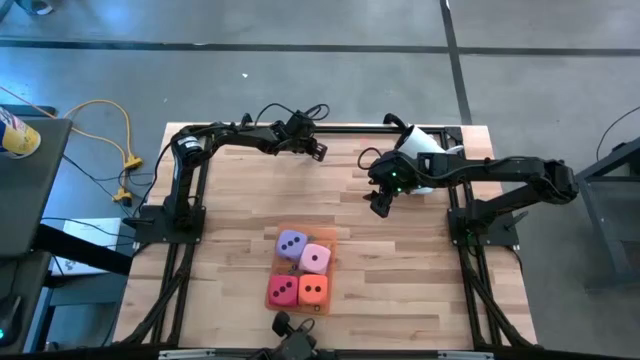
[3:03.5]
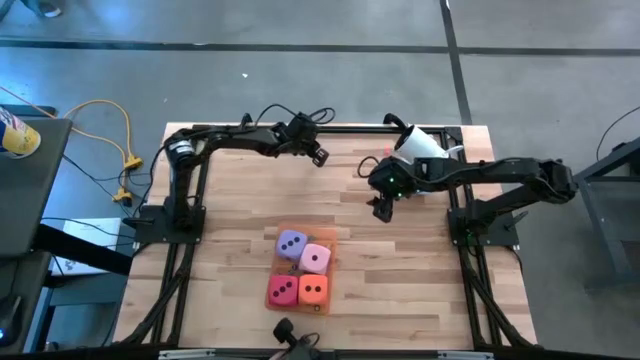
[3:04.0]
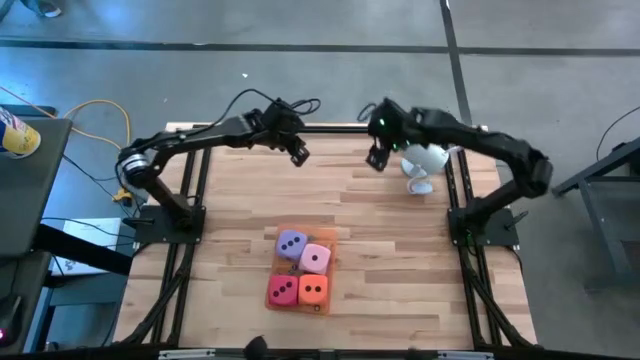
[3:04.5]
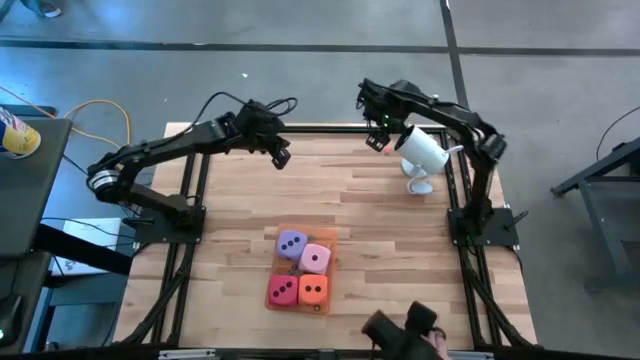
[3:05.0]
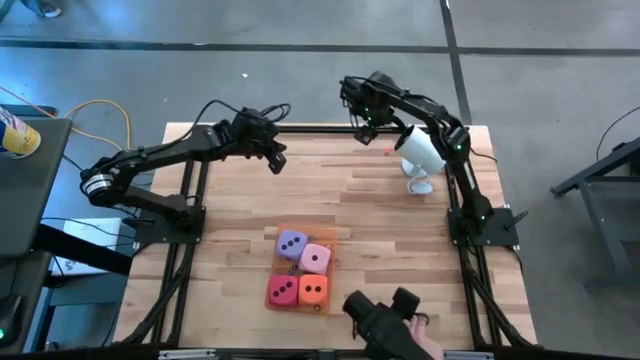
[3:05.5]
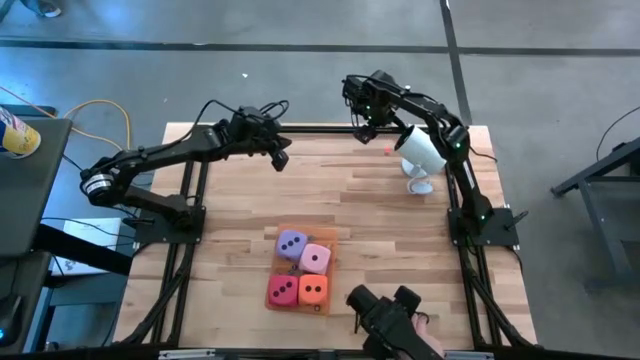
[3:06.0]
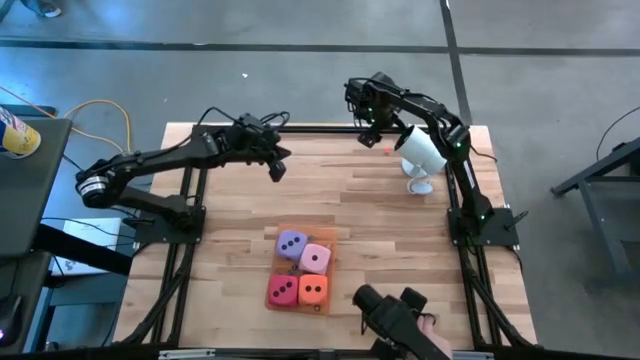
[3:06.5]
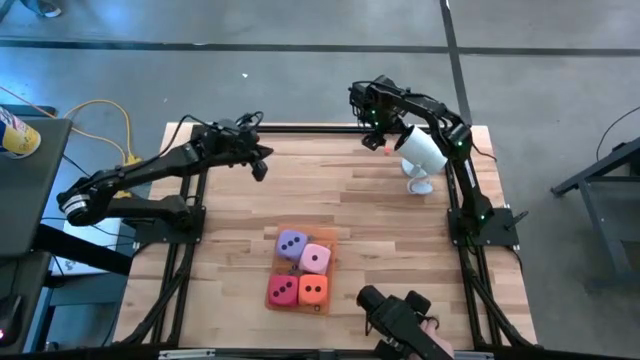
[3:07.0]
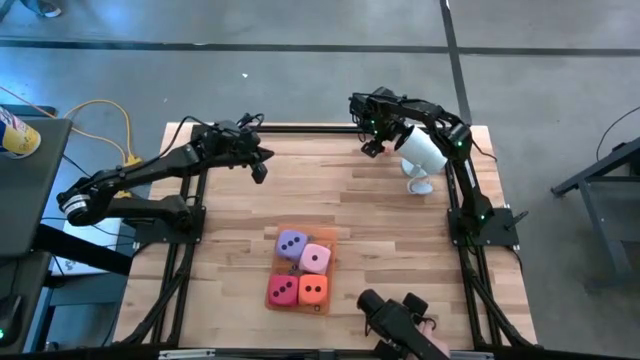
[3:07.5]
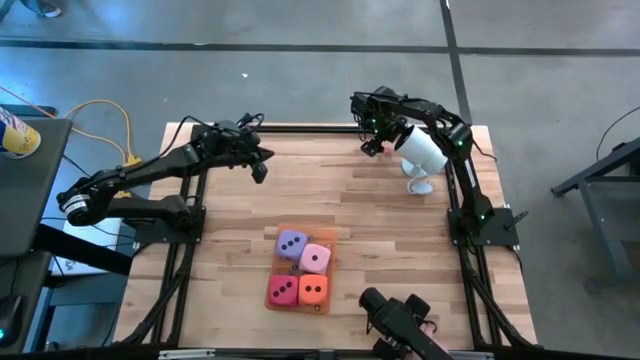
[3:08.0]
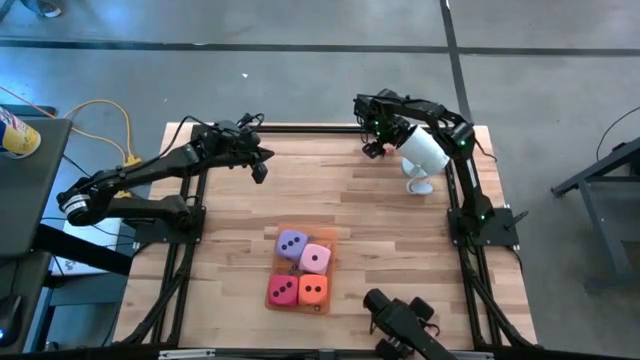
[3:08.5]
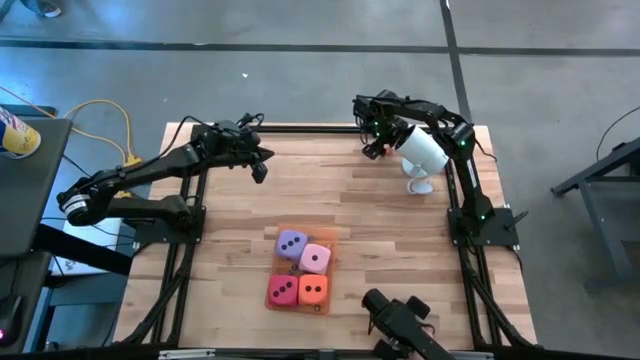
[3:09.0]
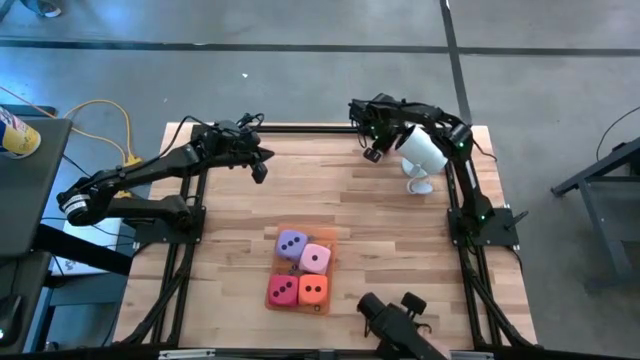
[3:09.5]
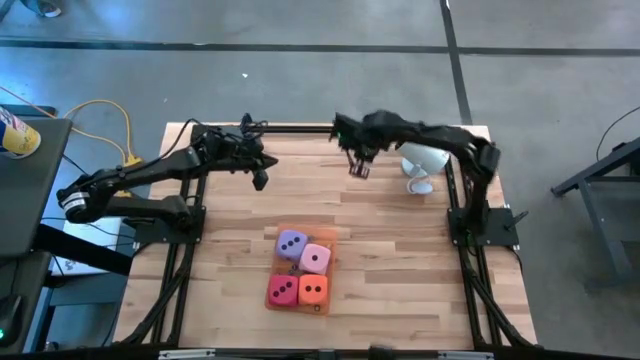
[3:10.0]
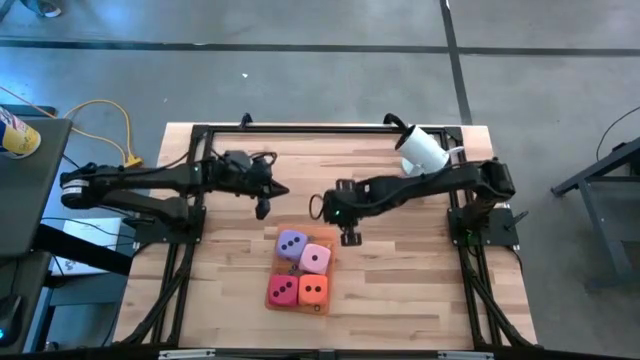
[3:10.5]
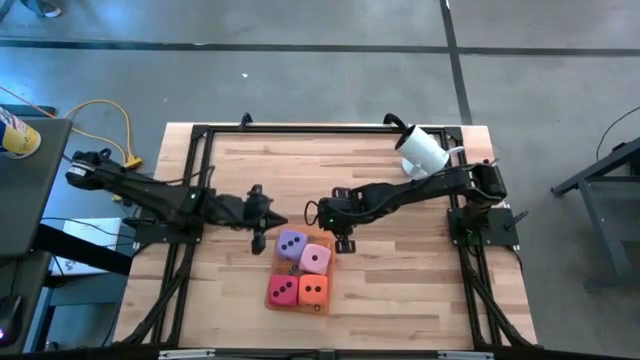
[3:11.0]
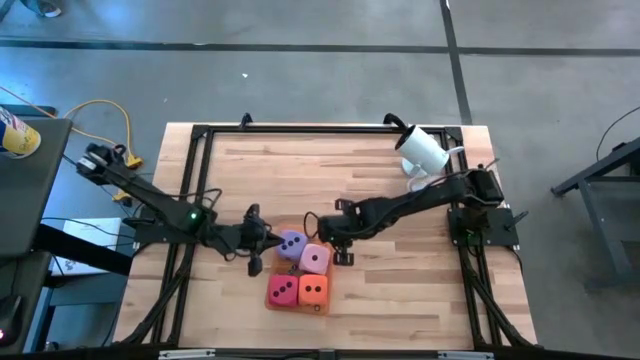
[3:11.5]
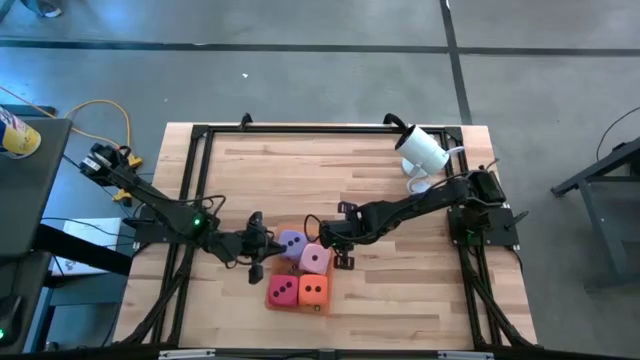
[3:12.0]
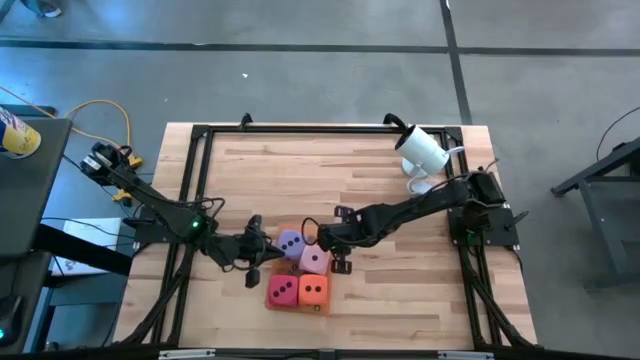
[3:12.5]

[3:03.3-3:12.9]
Task: Pick & Place Dice
Put the small orange dice into the orange bin

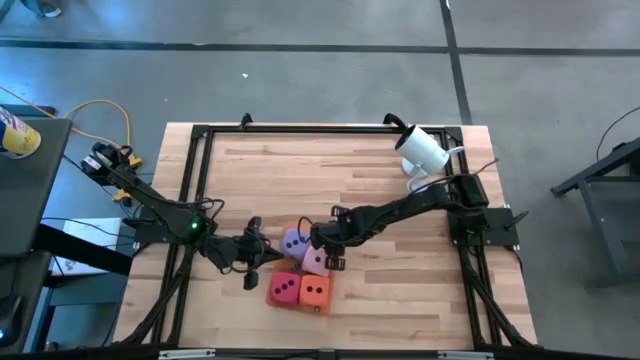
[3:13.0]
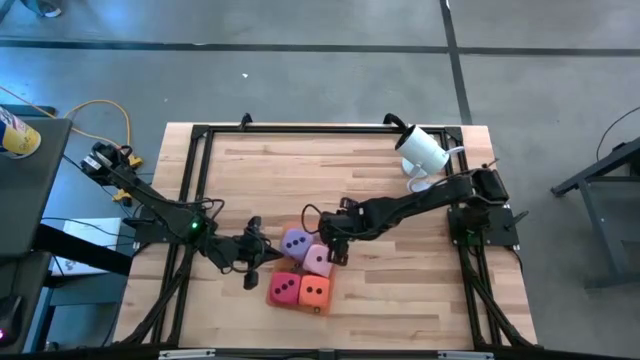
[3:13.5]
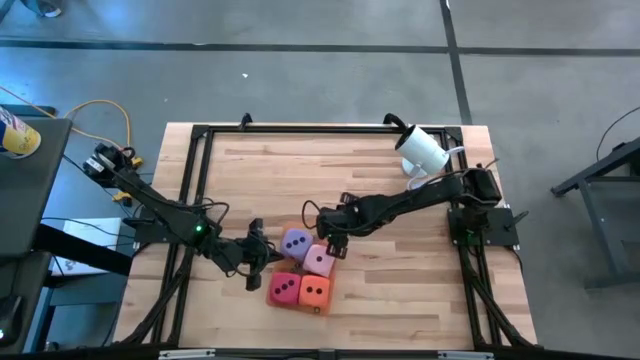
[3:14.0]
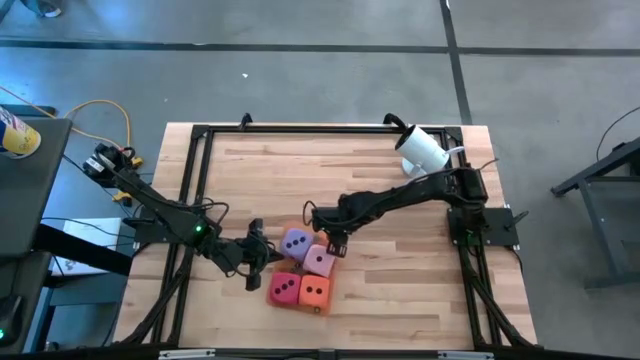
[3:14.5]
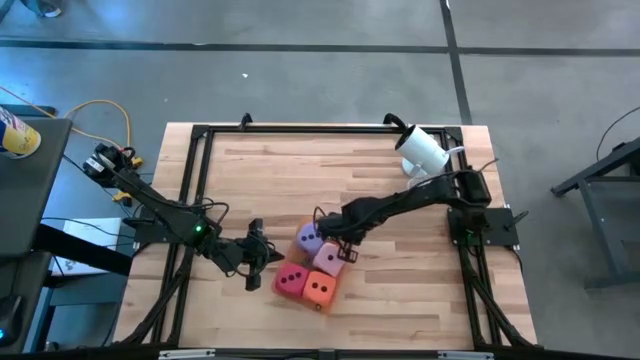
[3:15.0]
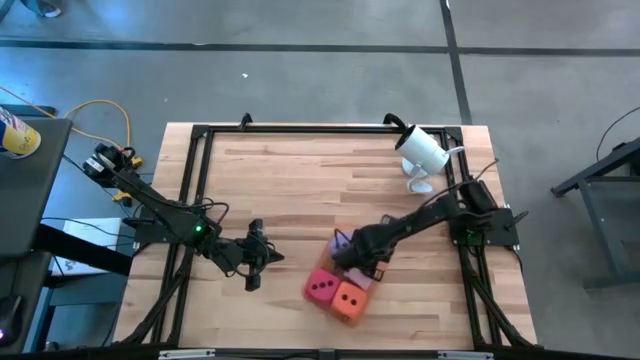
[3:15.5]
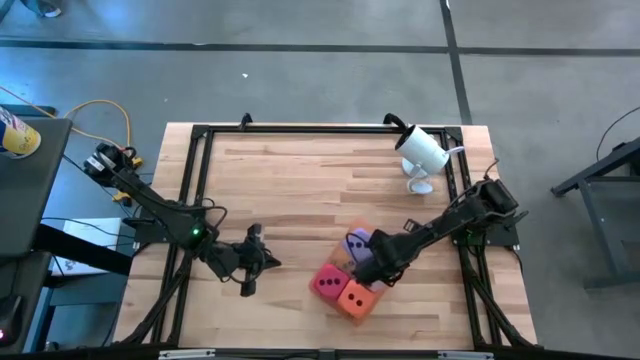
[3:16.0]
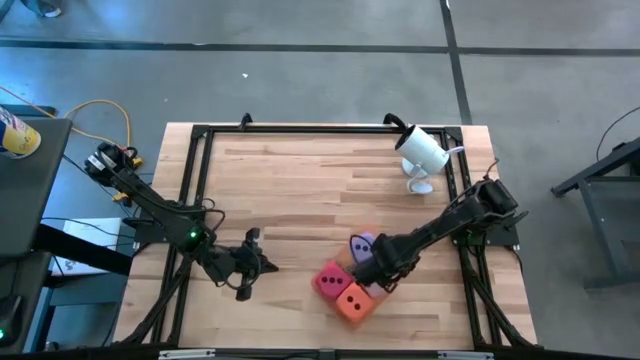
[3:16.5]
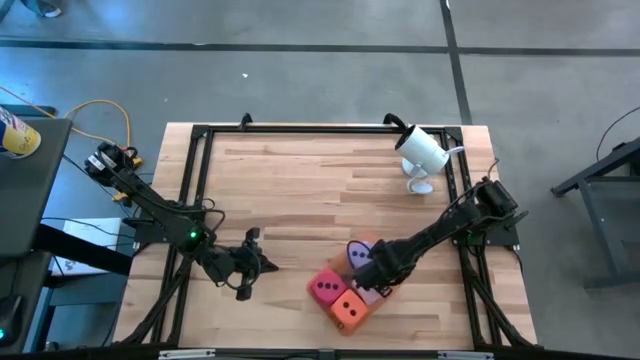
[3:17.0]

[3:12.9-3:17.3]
Adjust the orange bin

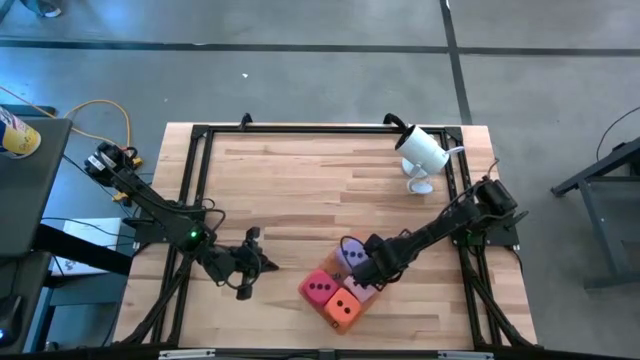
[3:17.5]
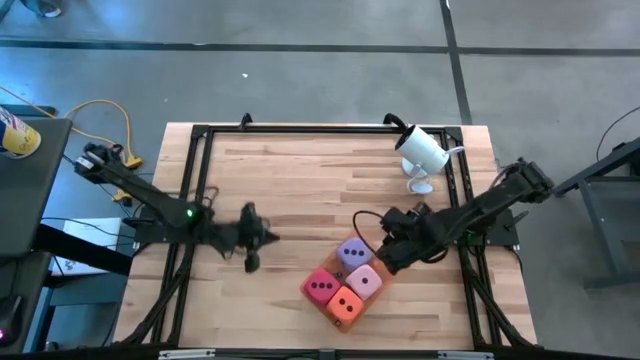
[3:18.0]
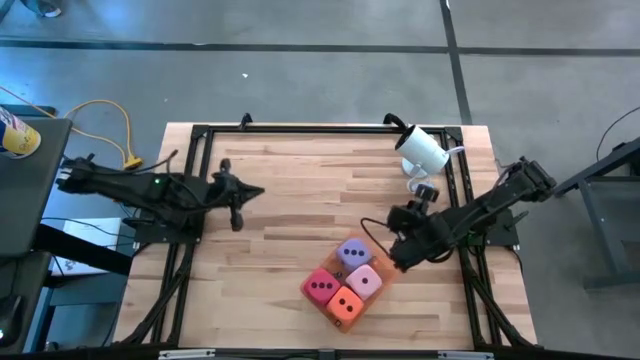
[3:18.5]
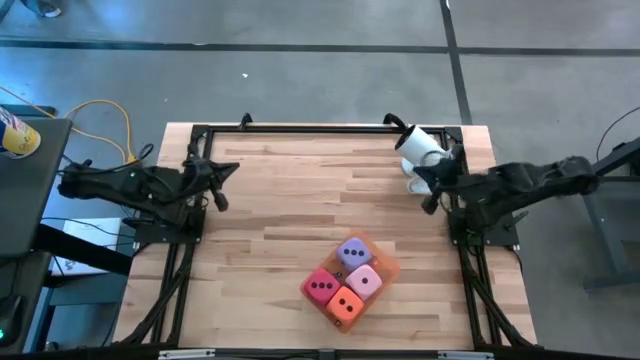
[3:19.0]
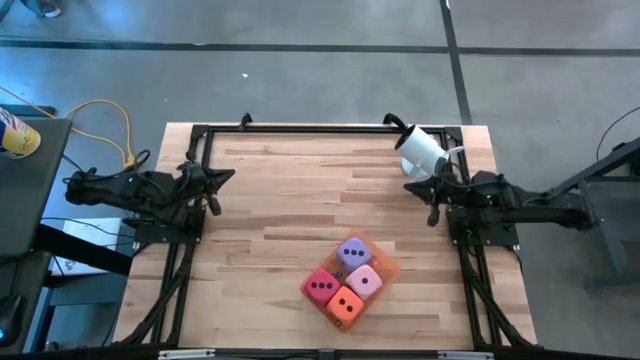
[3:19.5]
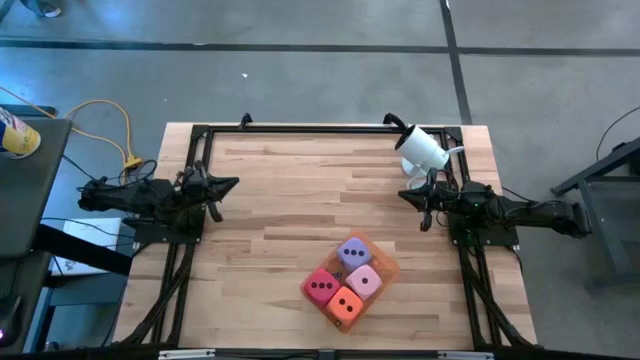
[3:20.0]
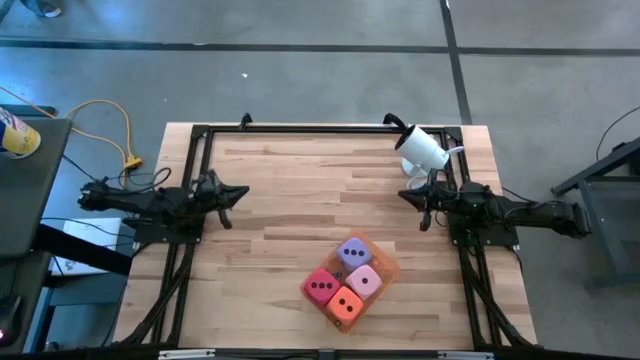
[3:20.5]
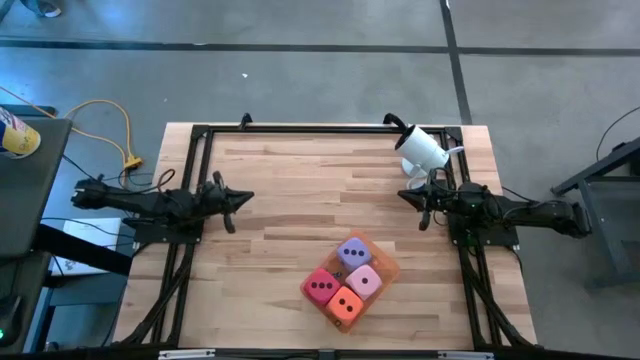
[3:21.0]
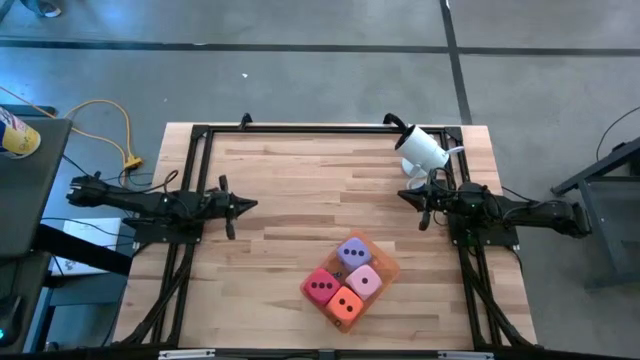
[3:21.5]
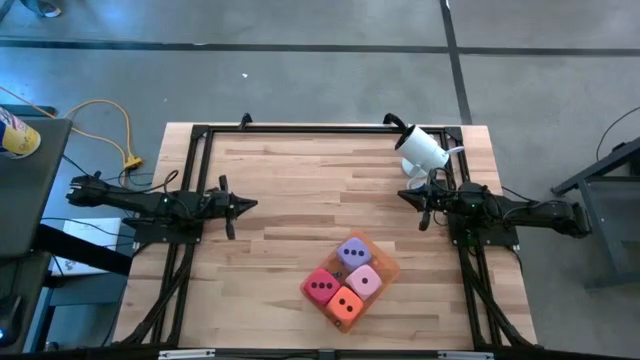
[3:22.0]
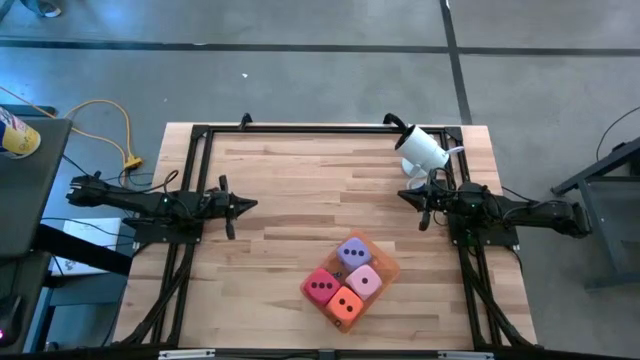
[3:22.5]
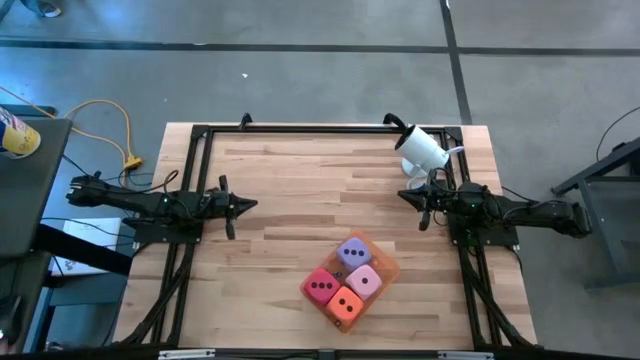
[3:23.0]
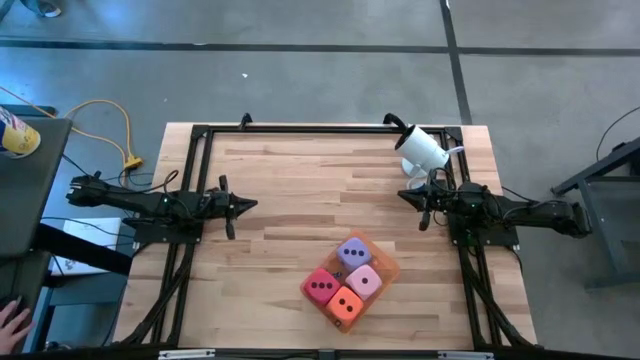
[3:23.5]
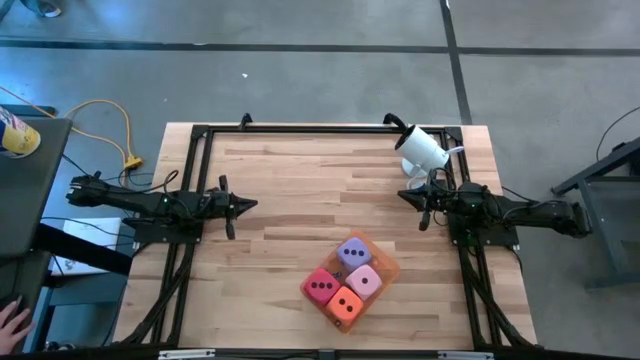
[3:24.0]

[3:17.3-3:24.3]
Return to Home Position

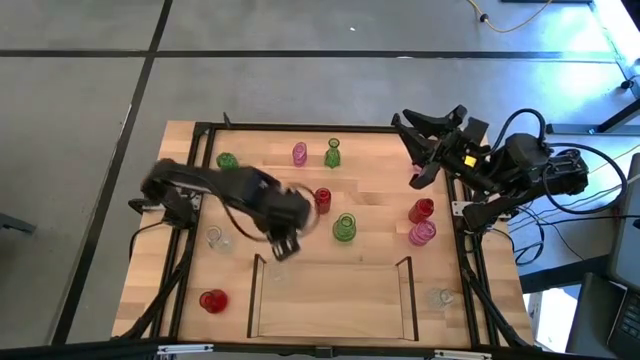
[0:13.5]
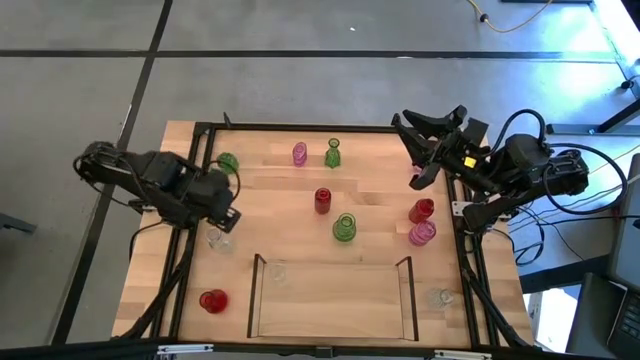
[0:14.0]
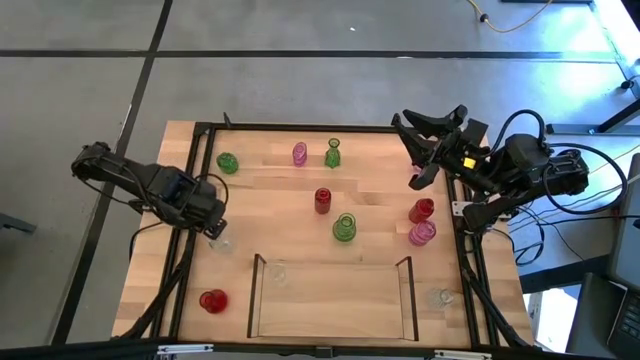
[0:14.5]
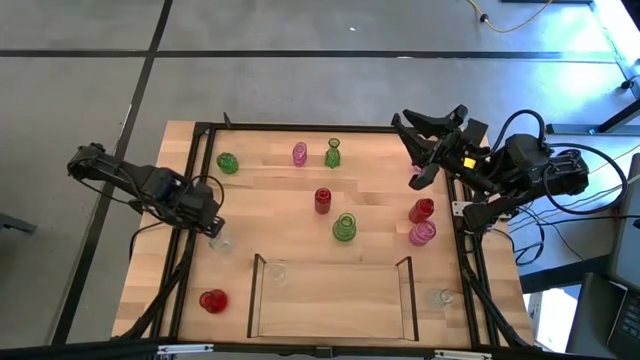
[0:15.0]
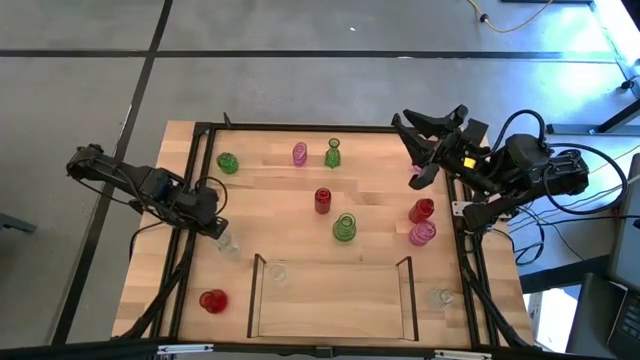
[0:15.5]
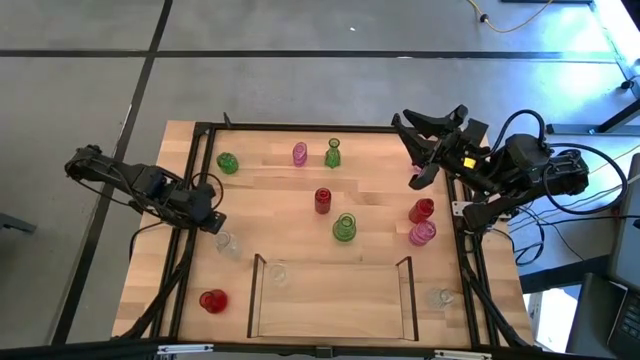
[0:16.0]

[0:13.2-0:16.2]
Task: sort vases onto shelf
Put the left transparent vase aligned with the other transparent vases on the shelf
